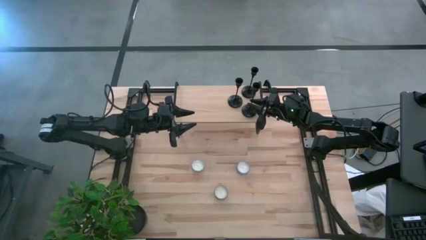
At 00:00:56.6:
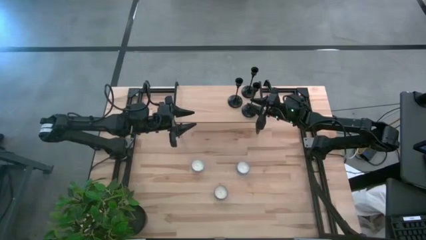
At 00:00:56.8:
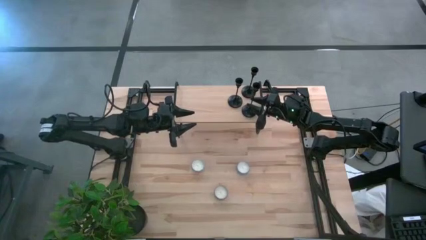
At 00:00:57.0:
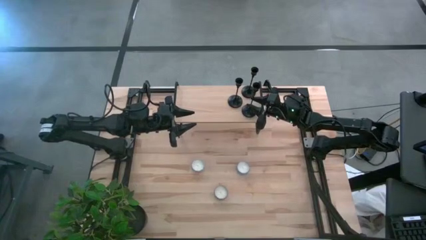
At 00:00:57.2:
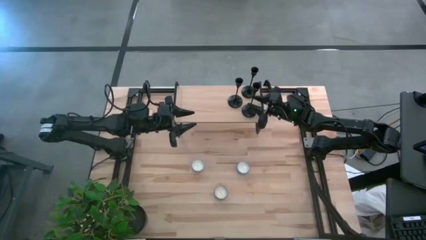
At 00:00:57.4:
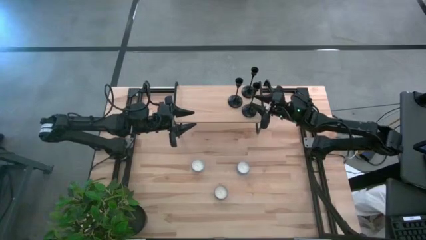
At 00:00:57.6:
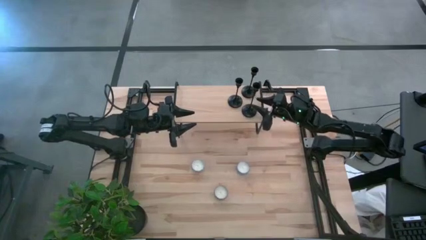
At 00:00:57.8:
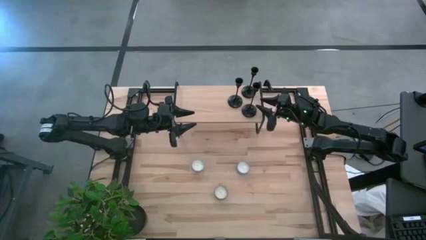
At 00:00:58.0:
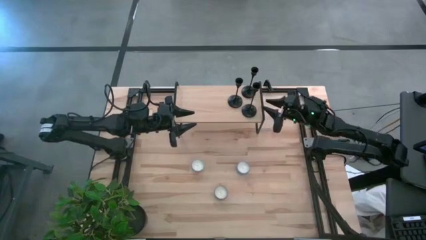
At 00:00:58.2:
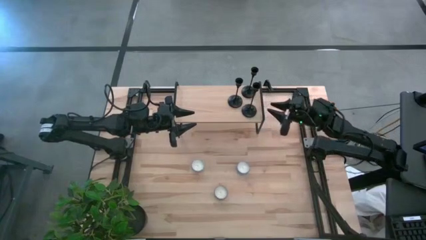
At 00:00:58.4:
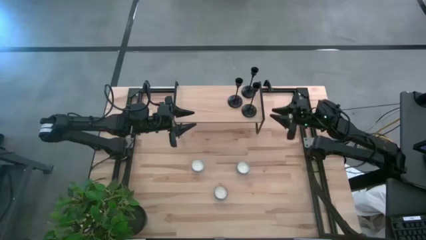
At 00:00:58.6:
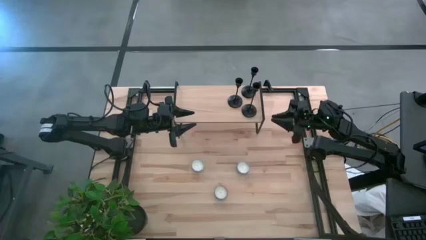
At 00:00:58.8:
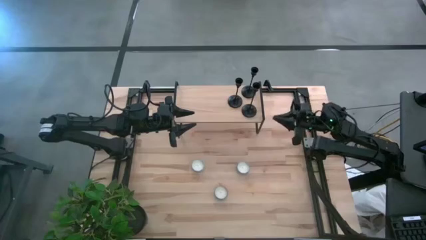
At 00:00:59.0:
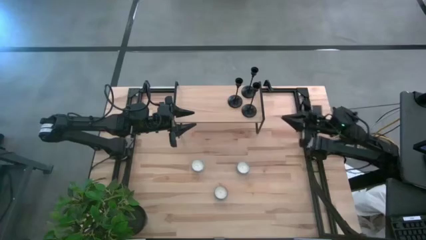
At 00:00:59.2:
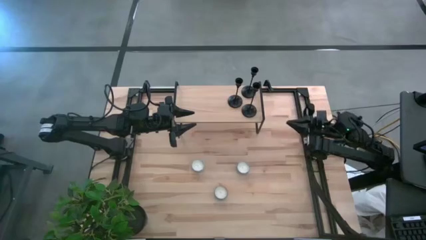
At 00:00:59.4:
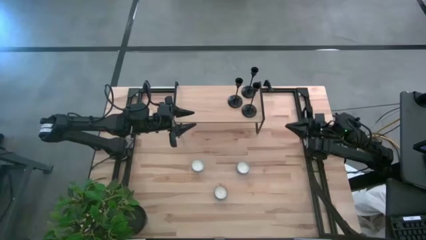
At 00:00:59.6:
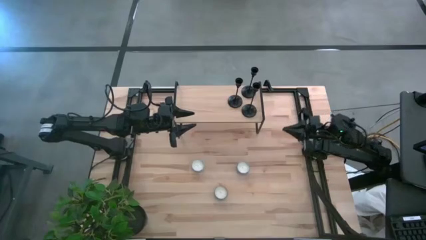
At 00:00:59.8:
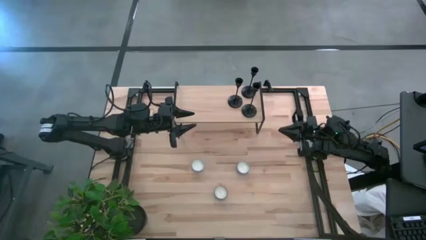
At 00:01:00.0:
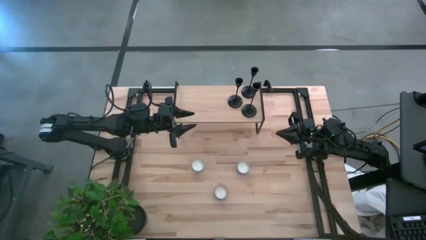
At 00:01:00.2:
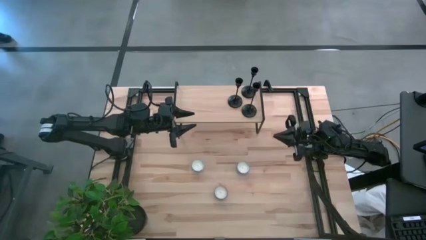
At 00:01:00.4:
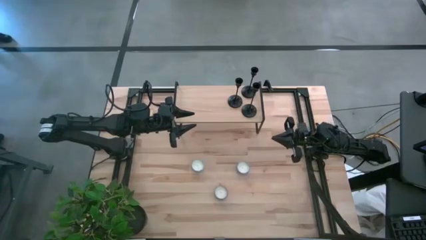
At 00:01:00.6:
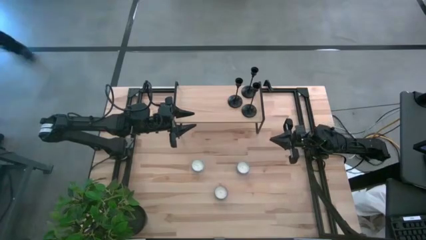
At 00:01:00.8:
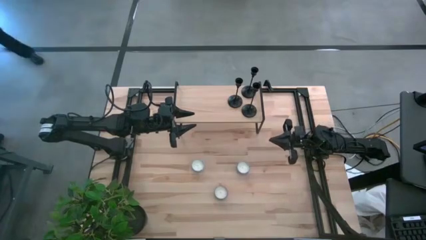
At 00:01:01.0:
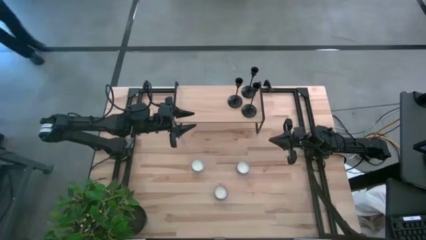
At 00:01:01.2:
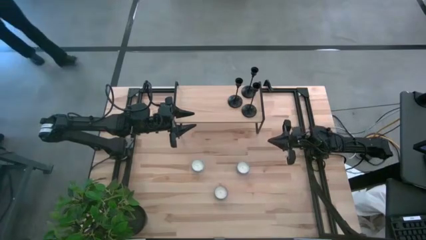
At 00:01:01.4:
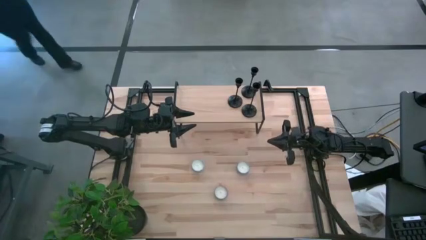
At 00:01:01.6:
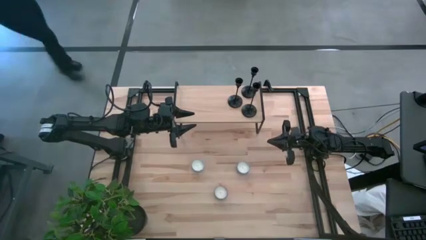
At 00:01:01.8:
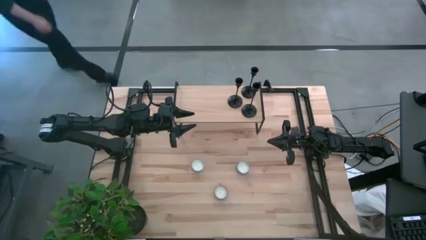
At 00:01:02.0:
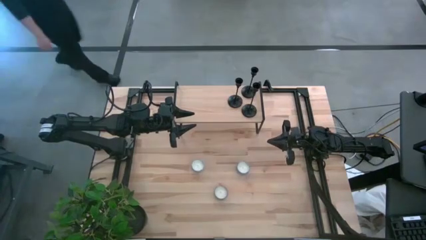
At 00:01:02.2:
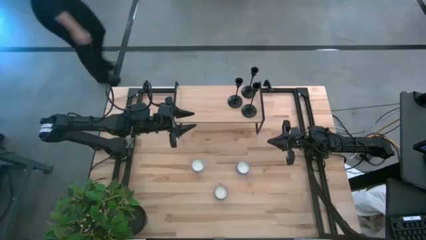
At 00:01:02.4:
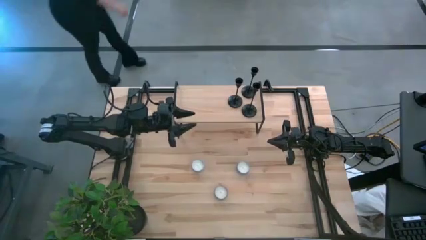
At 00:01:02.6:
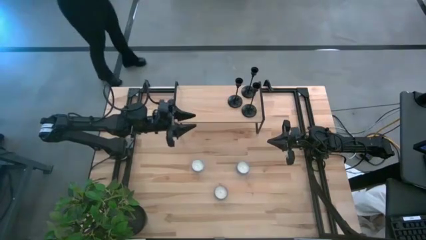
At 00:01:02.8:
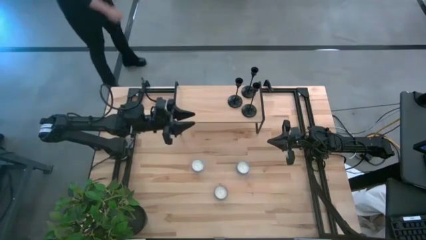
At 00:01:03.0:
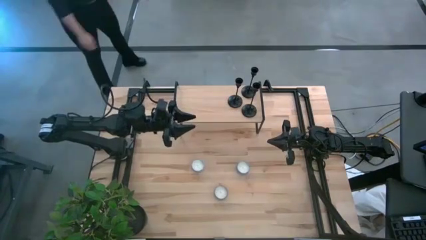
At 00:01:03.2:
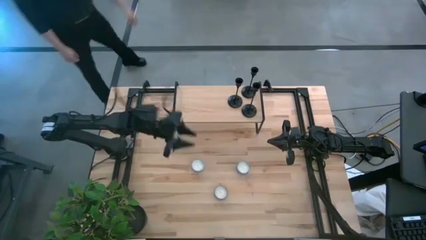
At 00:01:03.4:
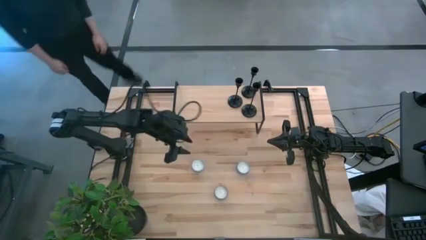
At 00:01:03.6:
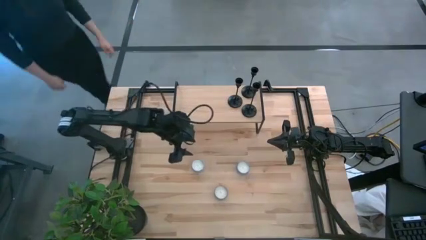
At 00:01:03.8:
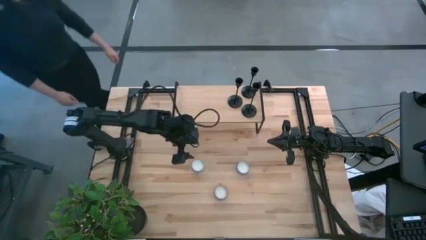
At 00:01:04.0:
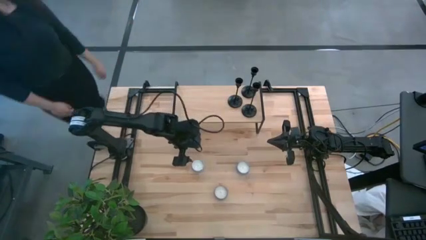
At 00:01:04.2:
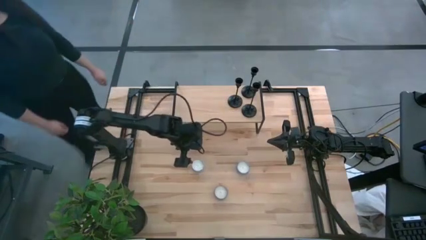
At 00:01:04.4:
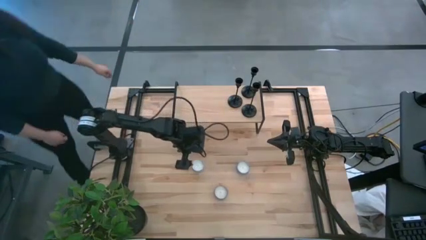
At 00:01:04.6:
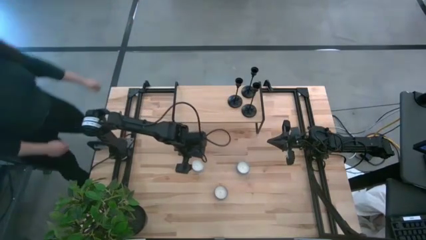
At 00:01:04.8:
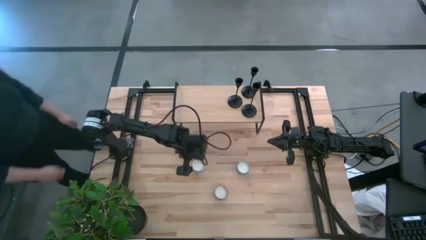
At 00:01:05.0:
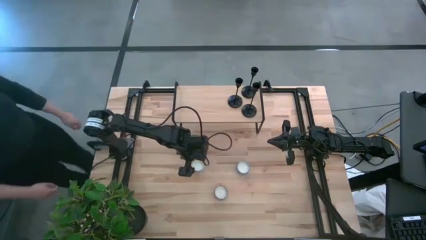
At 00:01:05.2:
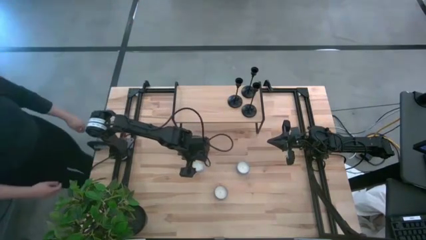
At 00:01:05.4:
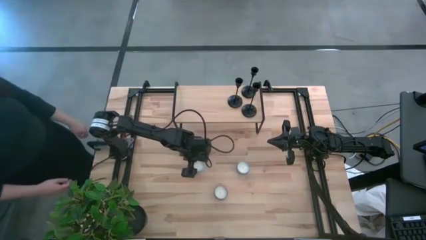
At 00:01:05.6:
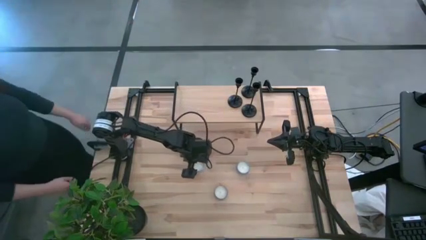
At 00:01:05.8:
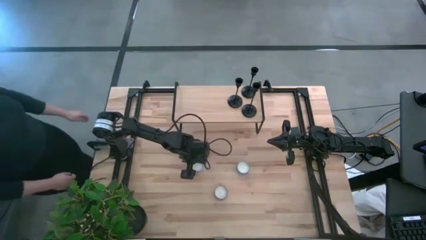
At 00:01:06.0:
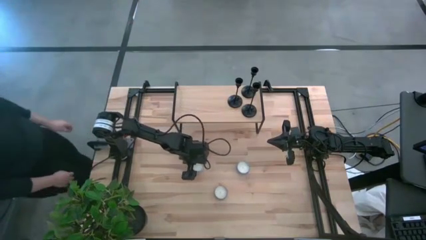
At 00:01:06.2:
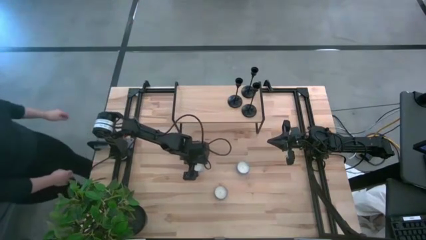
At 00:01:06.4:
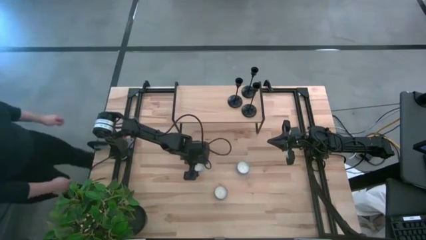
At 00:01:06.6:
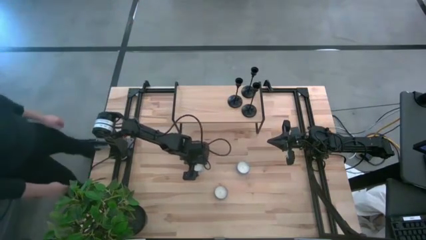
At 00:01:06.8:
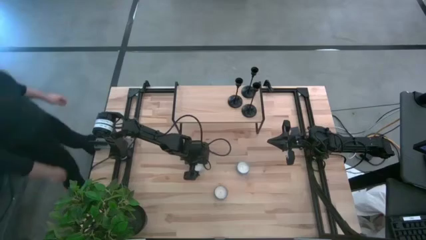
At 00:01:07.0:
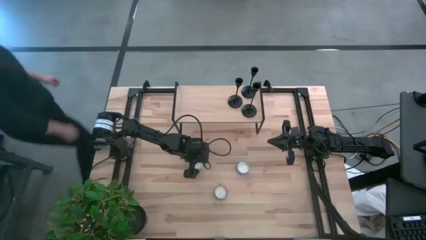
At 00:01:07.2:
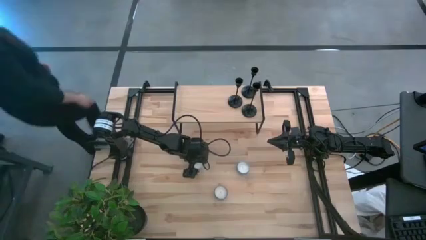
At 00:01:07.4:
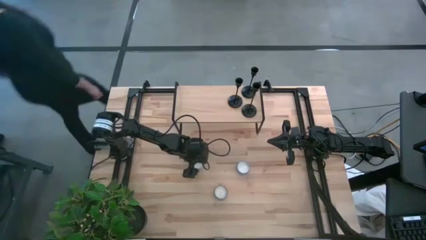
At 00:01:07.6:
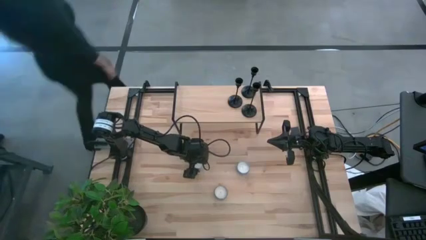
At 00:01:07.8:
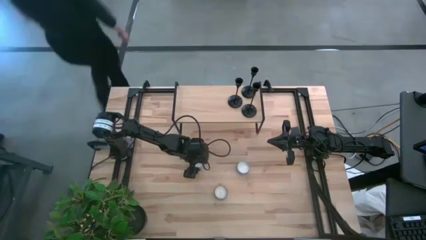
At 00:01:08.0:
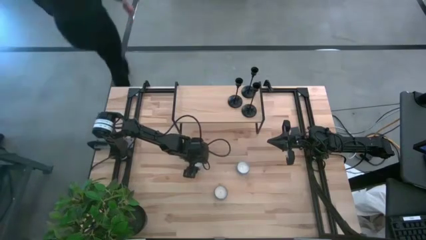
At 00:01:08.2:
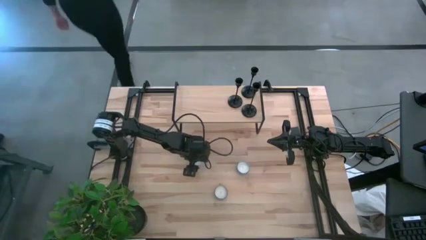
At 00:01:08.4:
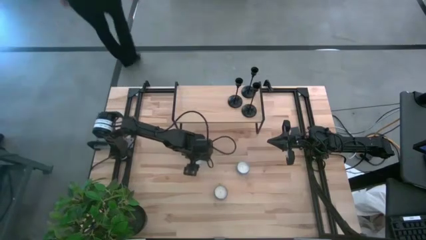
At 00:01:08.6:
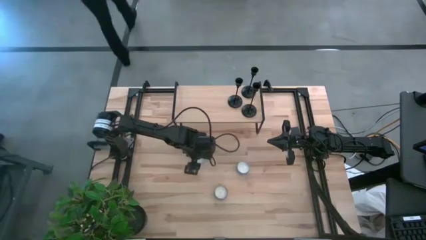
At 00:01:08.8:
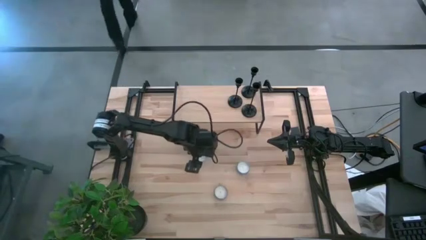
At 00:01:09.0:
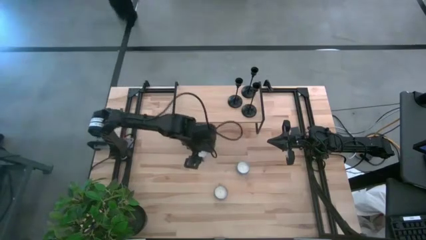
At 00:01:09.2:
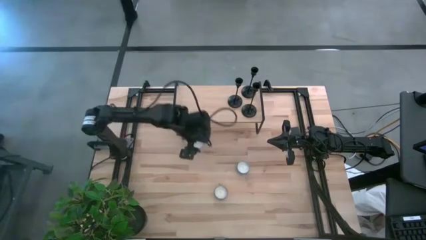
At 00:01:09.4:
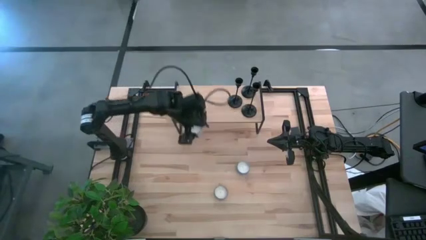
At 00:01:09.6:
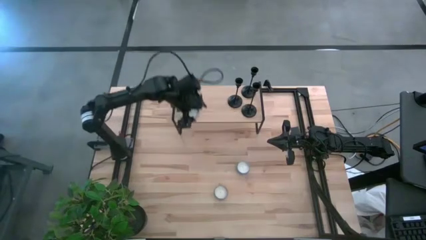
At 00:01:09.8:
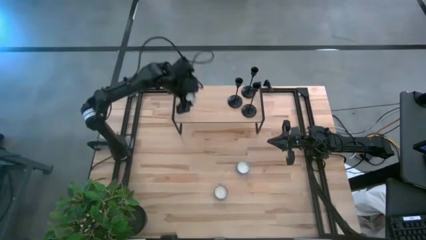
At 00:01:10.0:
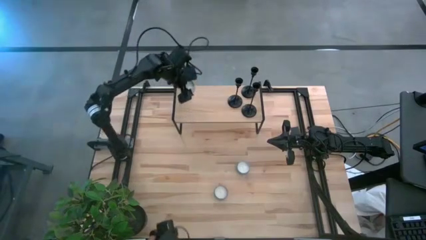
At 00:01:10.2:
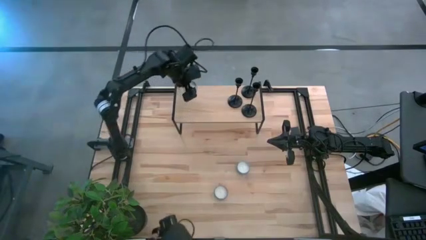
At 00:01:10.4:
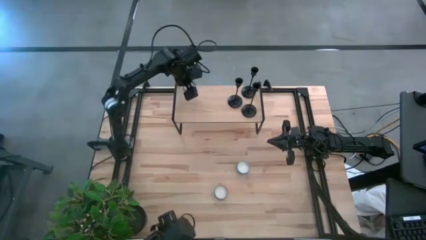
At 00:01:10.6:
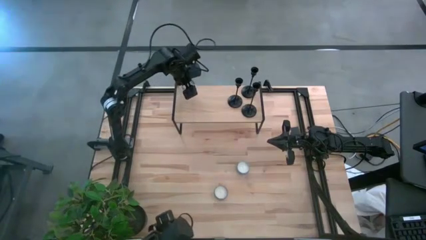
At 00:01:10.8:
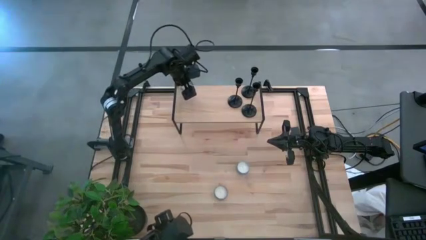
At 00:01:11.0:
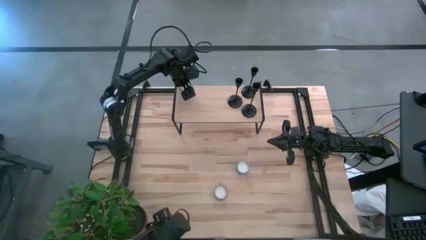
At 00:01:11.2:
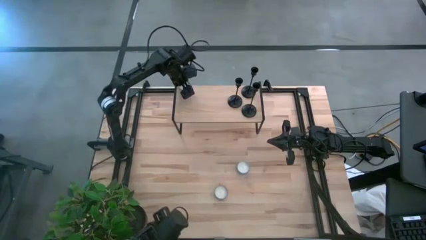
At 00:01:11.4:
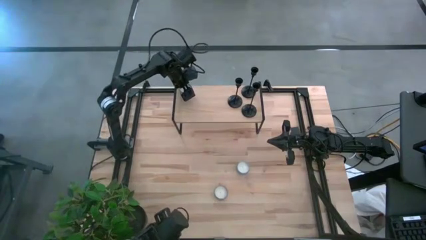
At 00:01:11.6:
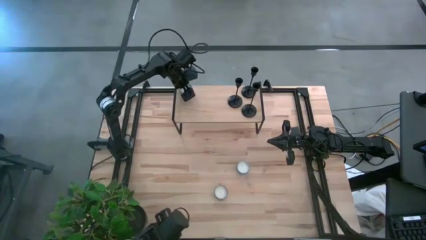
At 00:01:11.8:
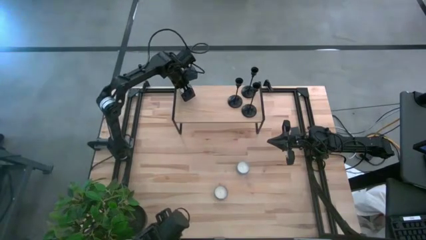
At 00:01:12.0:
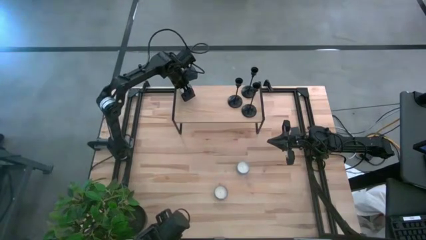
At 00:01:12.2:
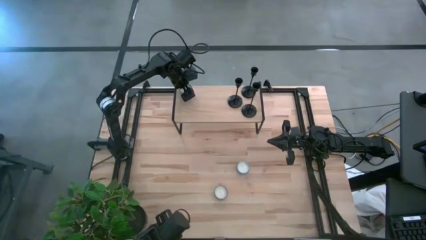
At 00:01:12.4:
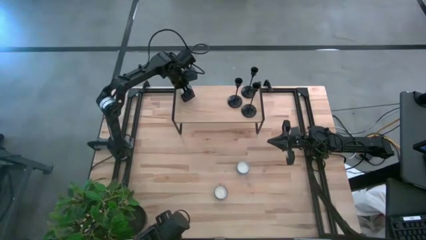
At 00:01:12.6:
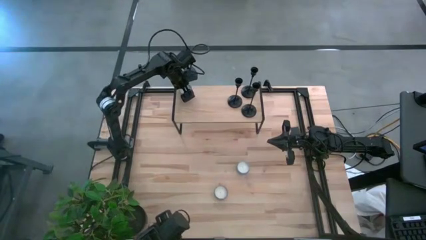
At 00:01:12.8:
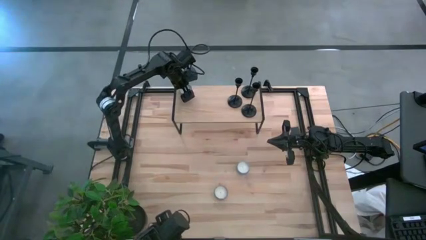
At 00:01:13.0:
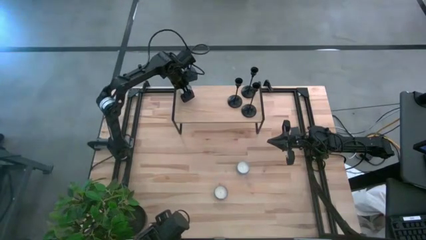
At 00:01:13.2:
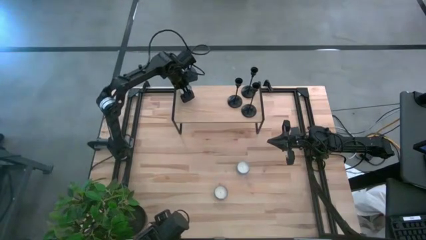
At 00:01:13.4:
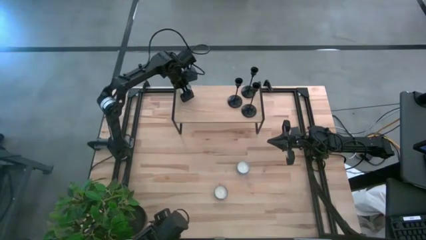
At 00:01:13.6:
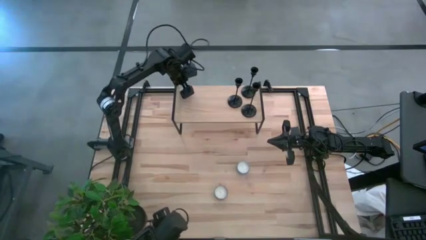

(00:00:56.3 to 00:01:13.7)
Task: Pick & Place candle stick holders
Put the white scented candle on the shelf
